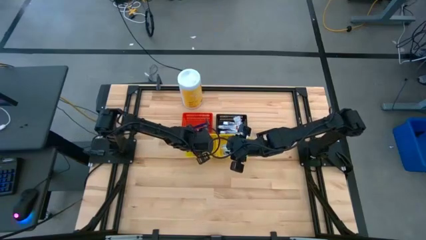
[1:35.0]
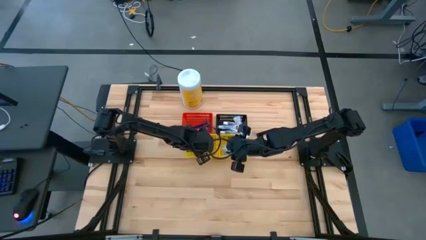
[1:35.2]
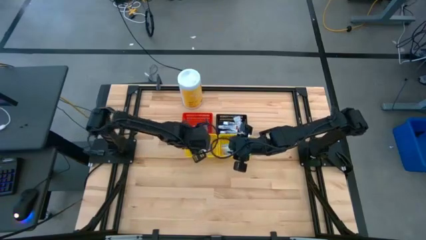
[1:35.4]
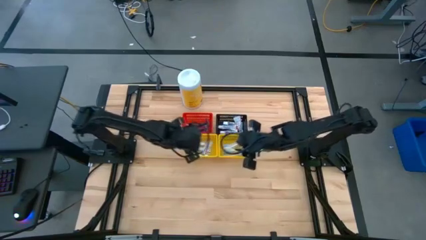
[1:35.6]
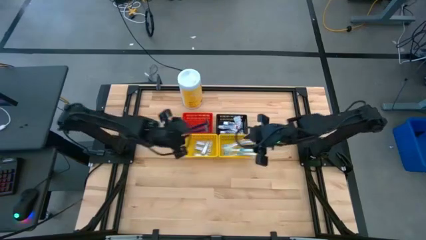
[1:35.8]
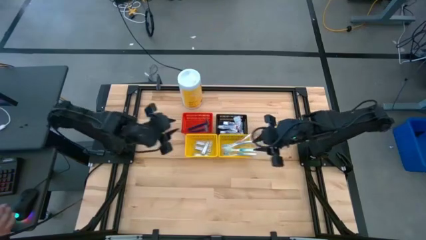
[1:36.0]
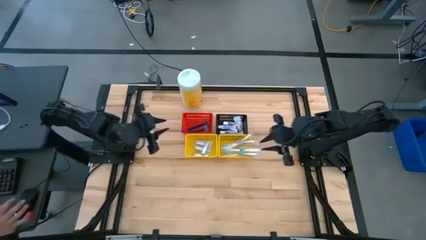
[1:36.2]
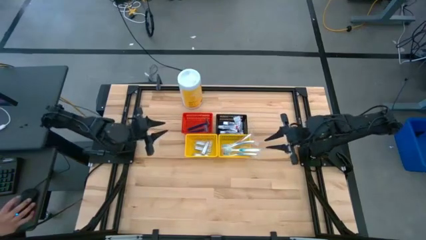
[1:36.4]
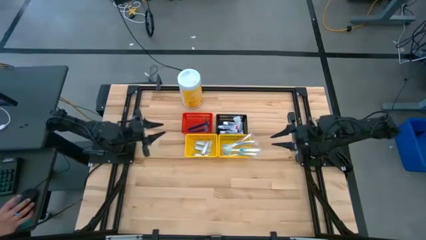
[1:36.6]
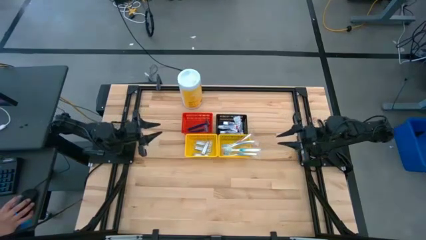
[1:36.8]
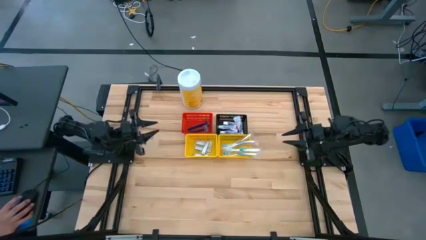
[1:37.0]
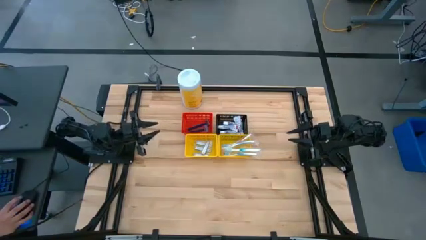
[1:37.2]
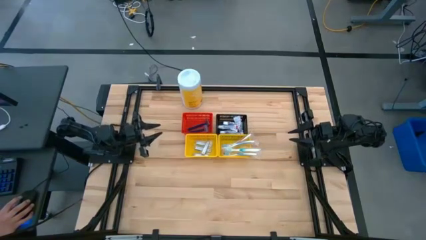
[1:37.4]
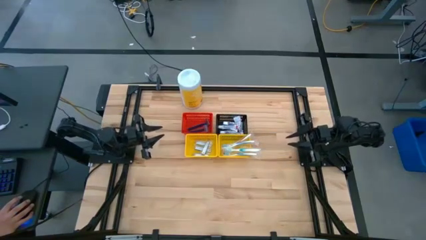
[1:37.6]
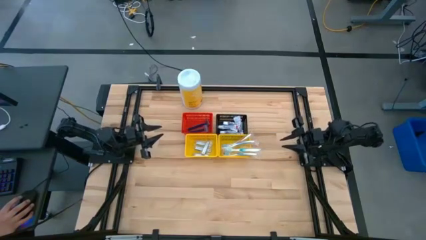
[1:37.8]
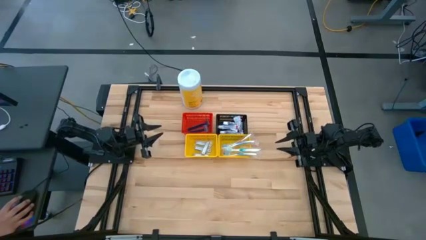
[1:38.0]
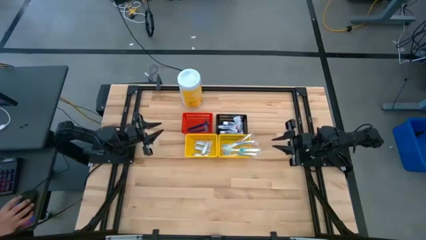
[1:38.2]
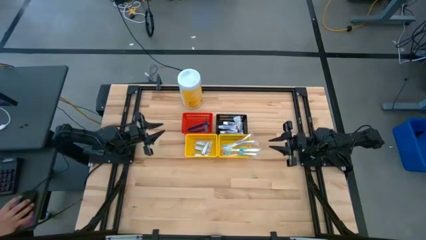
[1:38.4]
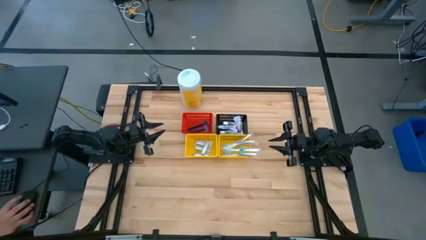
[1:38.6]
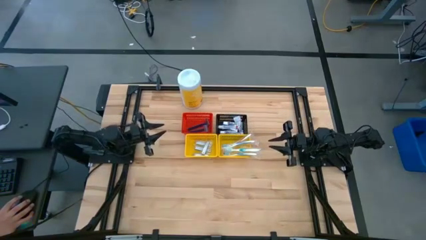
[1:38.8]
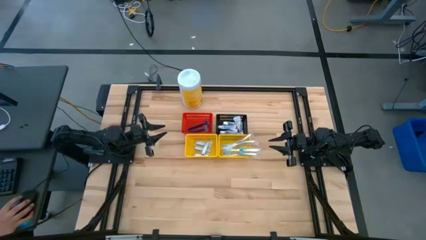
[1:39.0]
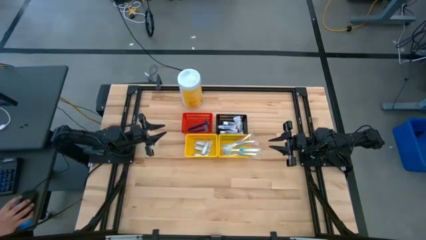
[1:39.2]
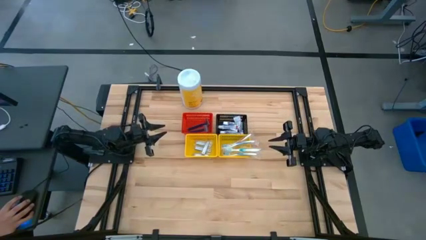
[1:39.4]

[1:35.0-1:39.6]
Task: Pick & Place Travel size toiletries
Return to Home Position

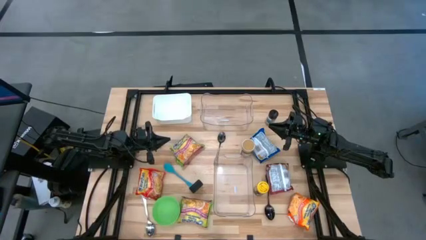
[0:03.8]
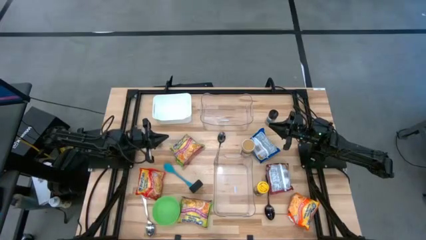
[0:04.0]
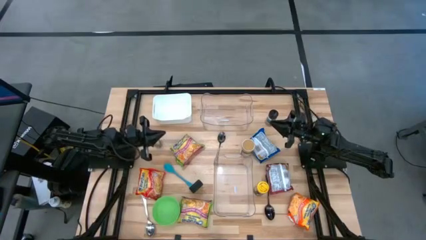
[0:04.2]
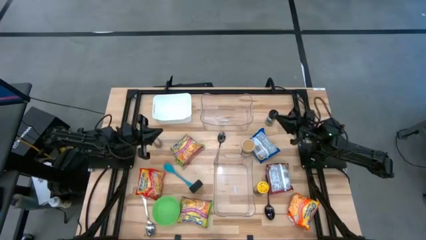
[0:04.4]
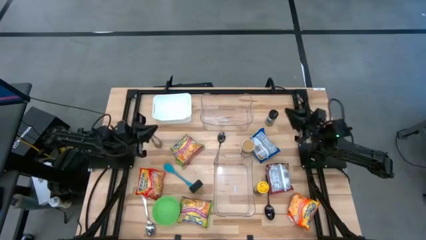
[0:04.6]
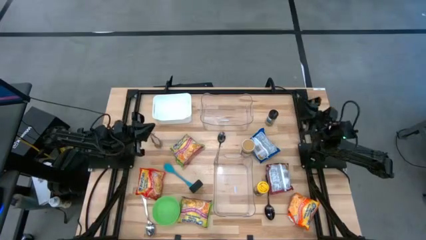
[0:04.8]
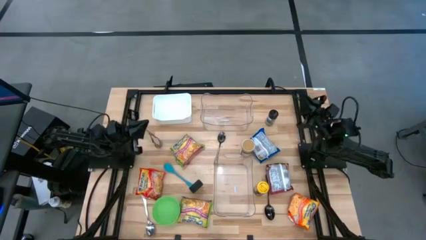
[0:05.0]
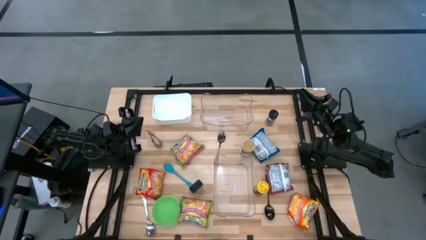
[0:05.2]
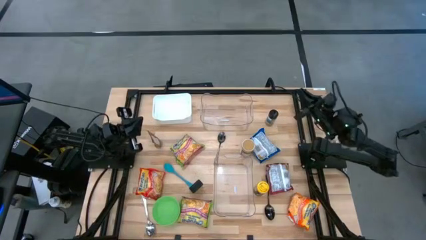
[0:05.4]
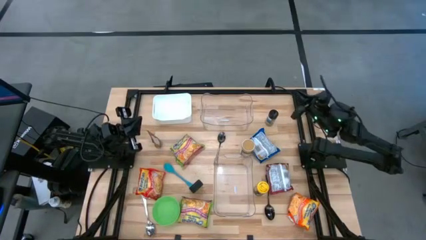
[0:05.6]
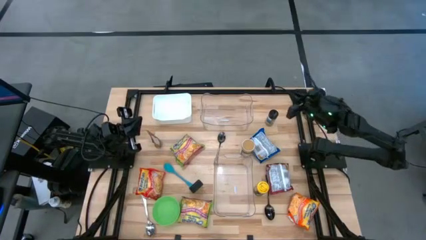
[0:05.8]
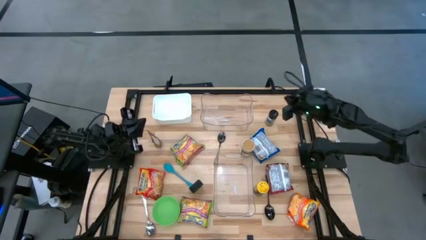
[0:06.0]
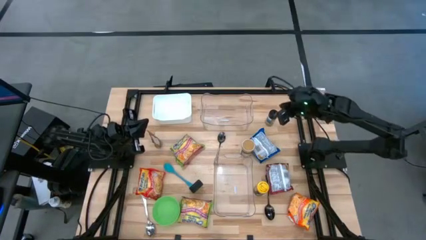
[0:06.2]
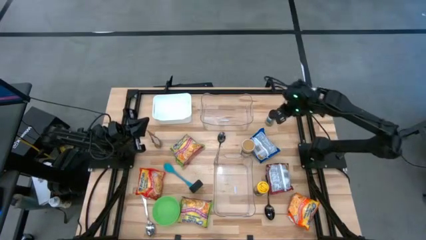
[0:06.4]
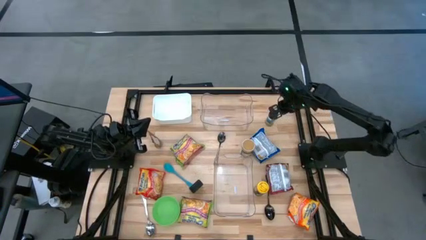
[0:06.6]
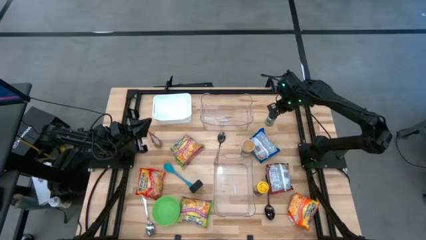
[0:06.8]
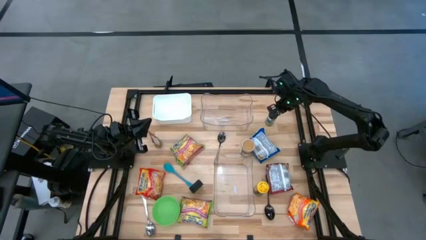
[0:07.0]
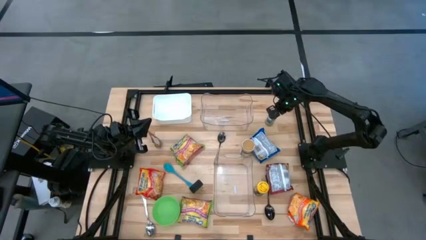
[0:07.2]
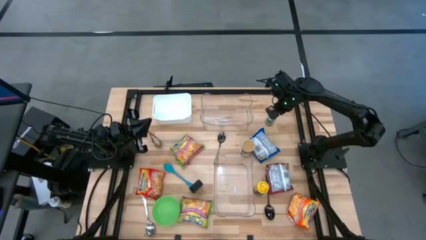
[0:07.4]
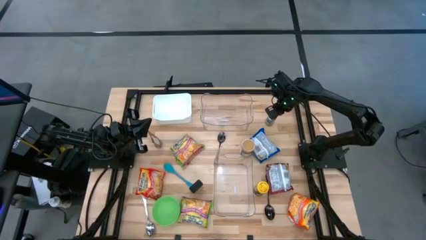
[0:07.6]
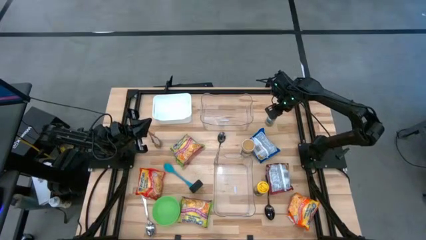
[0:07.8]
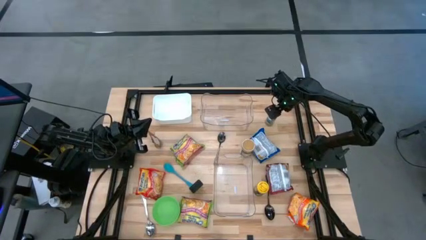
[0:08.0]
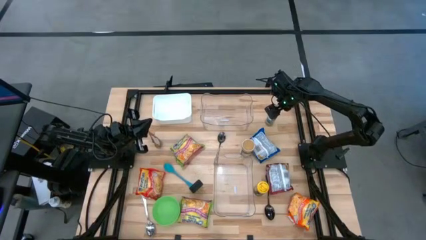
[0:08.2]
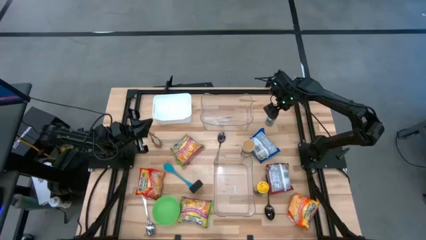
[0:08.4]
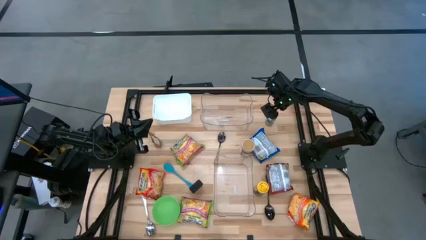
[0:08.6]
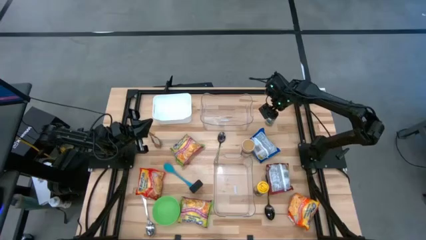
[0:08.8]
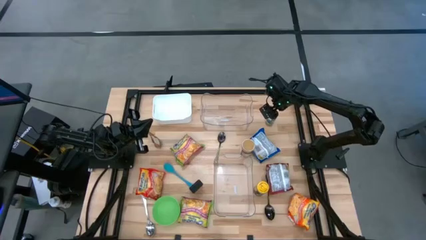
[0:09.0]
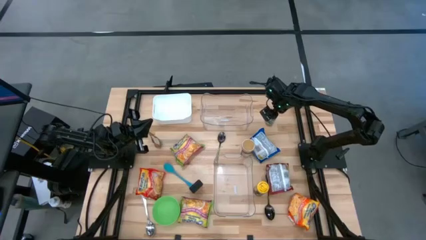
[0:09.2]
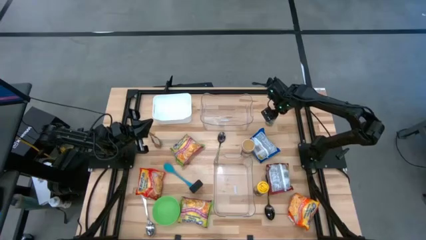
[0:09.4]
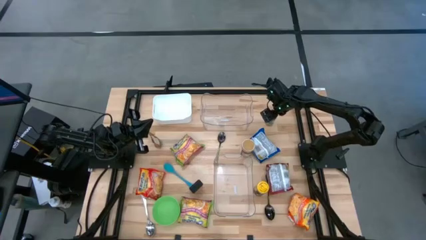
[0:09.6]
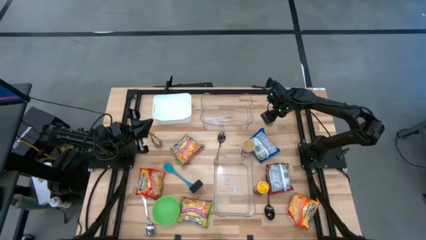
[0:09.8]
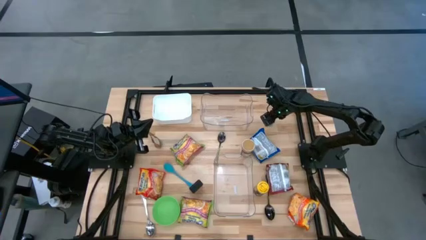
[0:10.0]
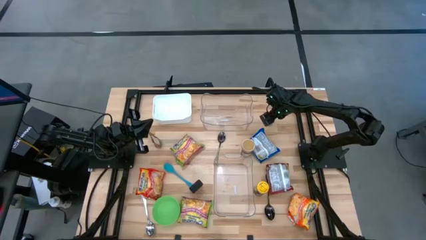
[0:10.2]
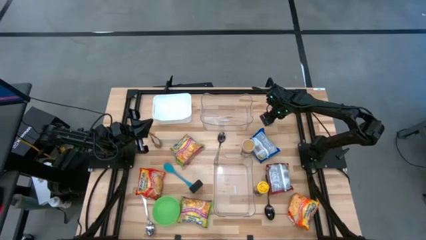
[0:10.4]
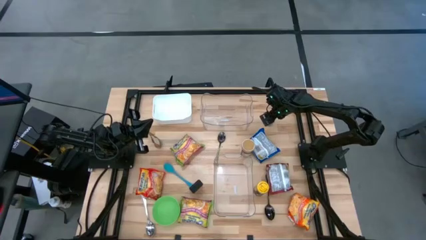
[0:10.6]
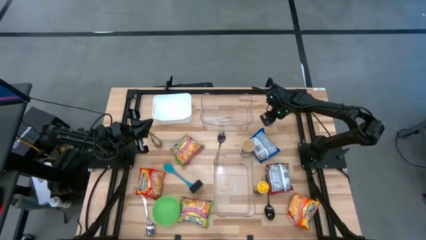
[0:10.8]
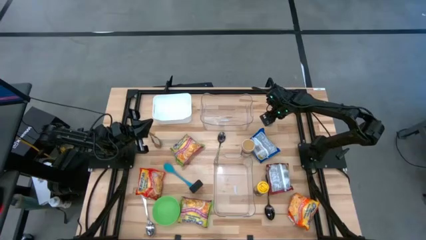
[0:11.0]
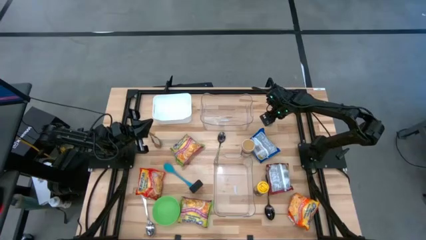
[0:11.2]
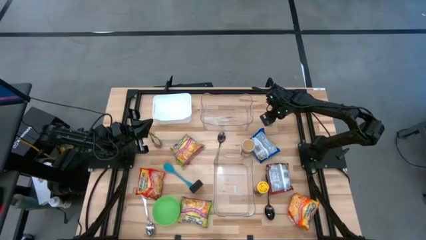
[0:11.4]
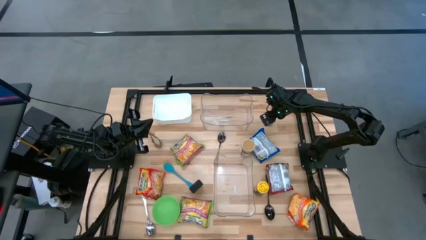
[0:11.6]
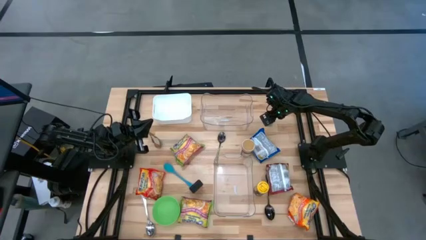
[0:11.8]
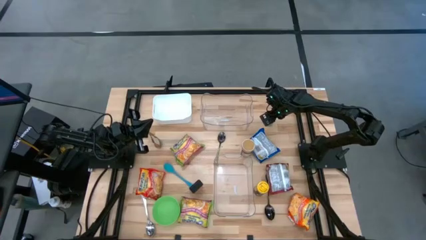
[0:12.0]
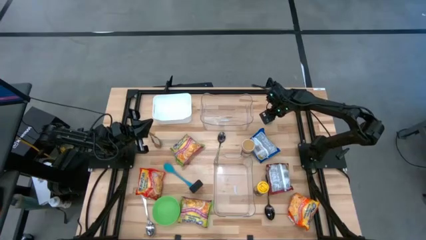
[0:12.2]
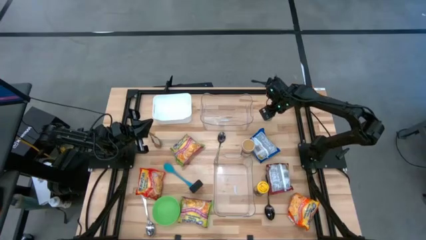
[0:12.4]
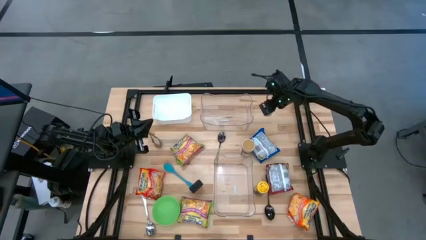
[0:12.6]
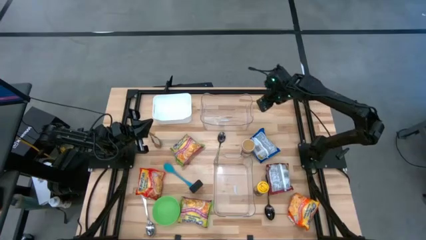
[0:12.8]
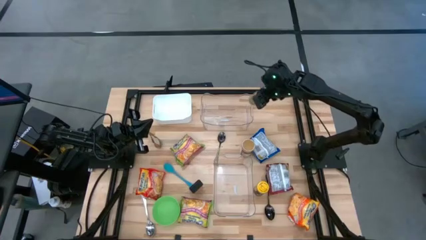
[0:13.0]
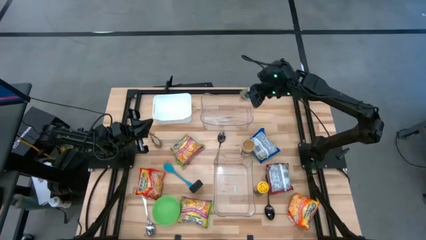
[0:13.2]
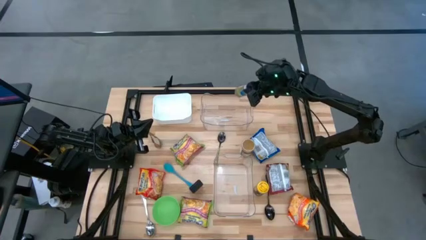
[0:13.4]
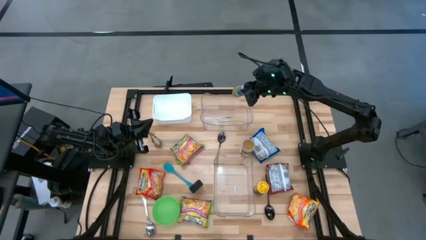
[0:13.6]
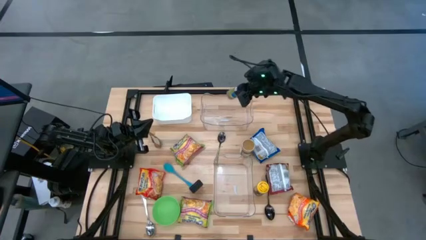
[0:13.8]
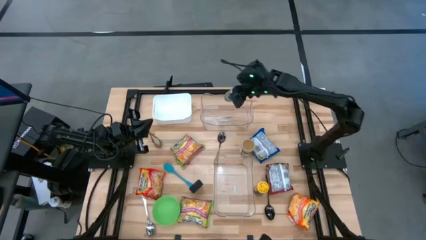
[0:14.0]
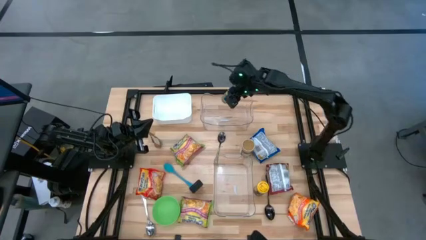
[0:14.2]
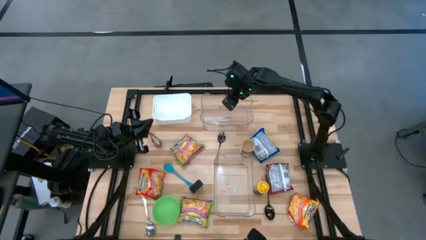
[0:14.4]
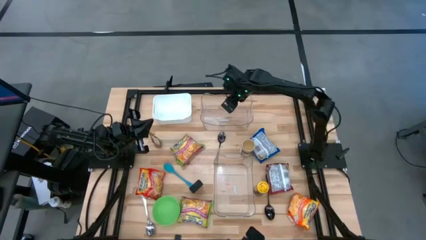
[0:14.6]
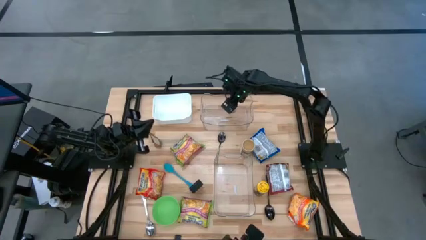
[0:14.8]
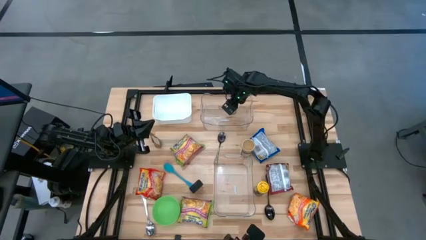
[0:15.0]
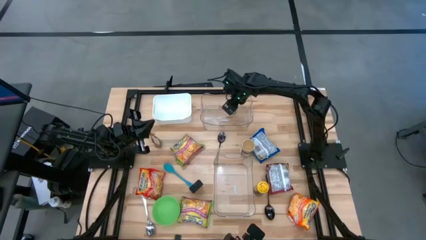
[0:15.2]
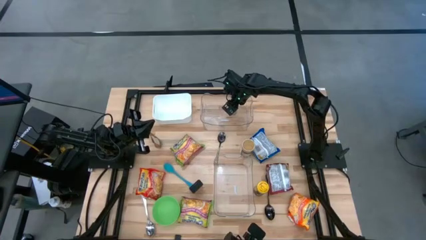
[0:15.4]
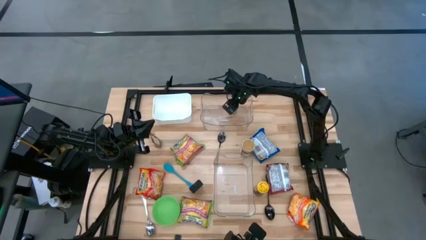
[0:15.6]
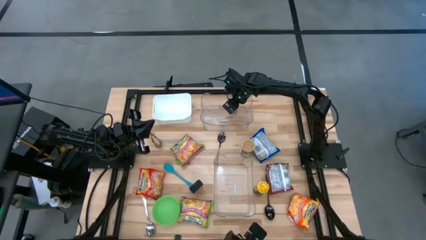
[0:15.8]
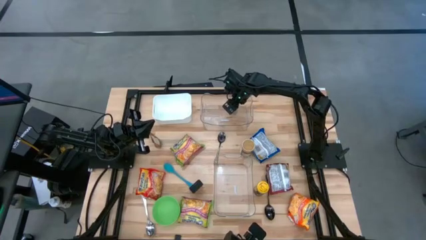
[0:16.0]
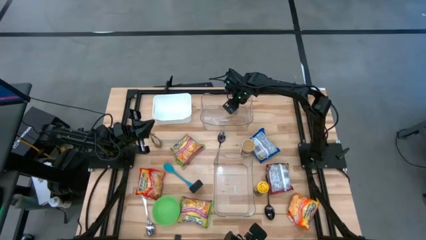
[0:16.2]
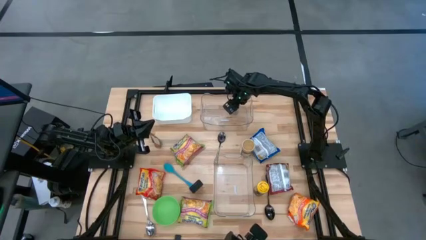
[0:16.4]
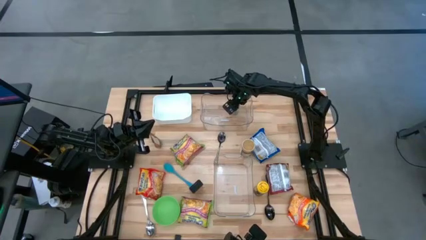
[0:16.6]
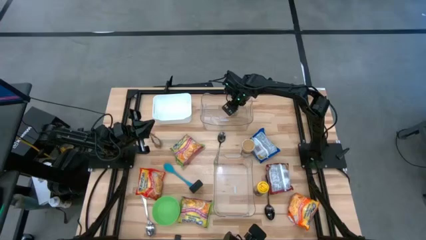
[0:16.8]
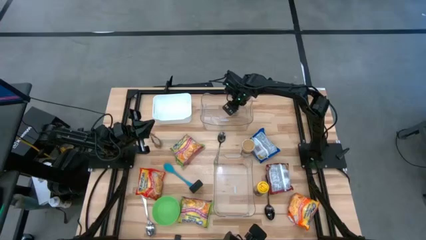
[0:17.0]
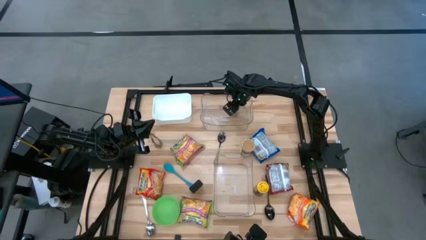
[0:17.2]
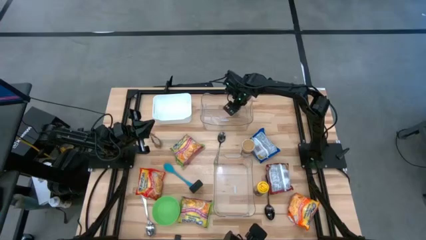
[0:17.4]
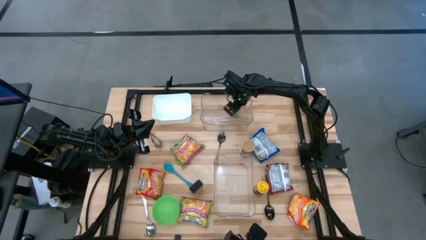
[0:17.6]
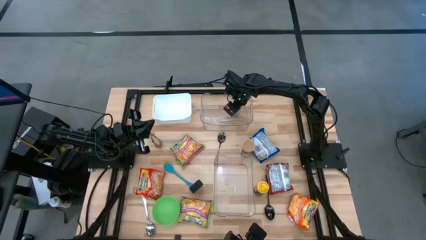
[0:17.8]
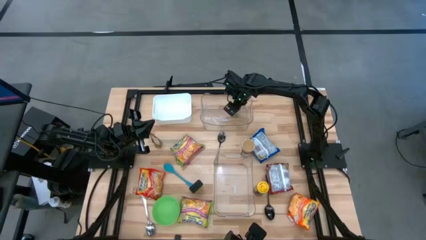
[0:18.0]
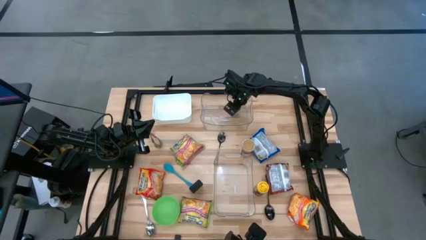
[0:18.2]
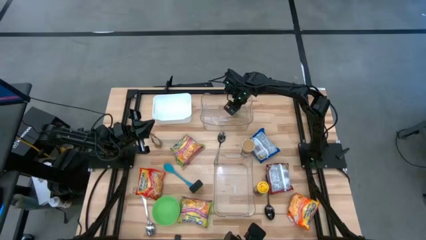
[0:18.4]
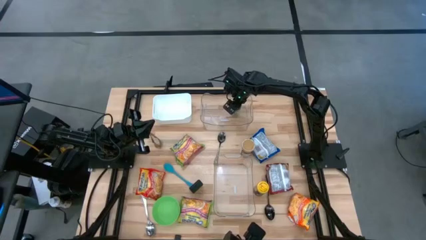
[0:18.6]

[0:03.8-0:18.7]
Task: Pick & Place Food Item
Put the black seasoning bottle into the top transparent bin
